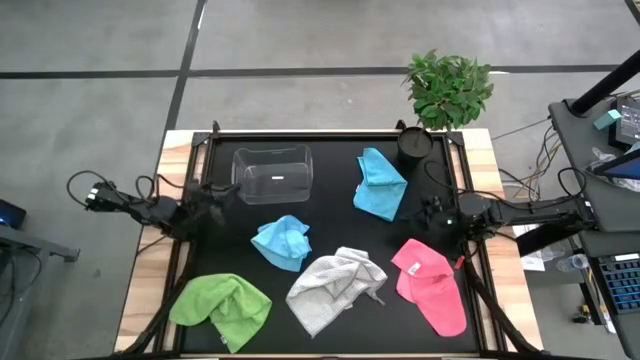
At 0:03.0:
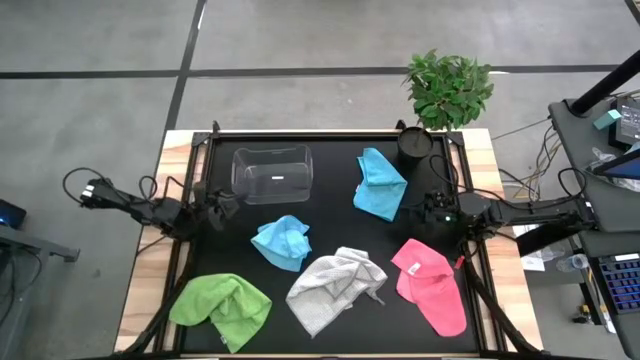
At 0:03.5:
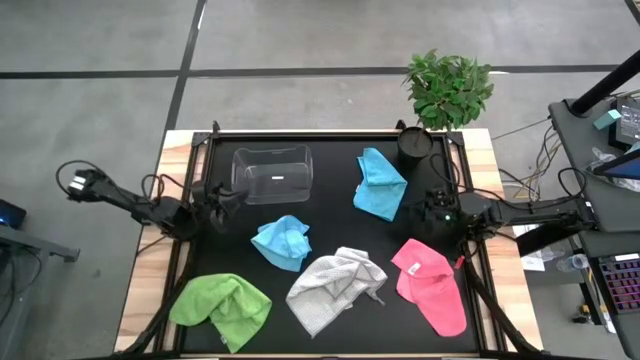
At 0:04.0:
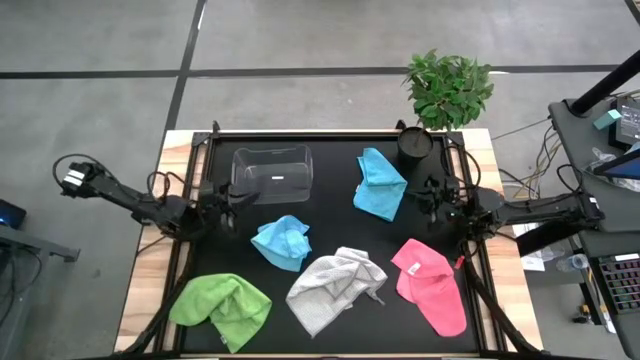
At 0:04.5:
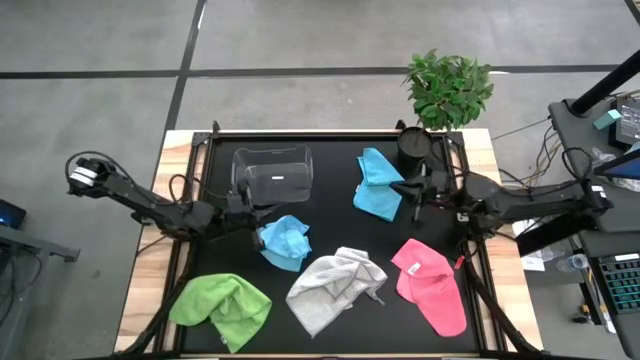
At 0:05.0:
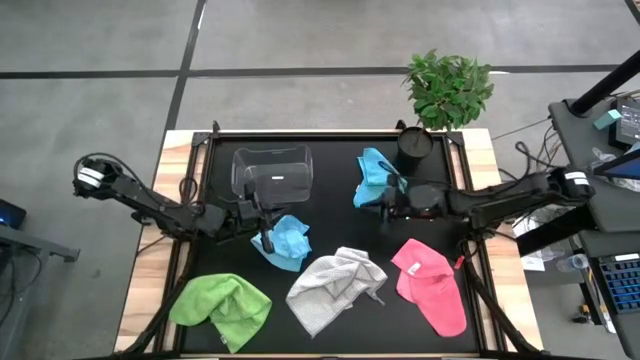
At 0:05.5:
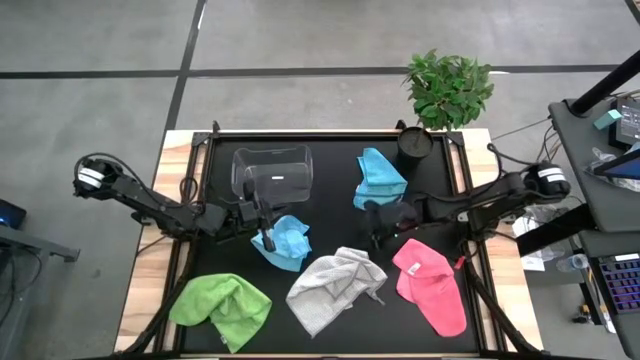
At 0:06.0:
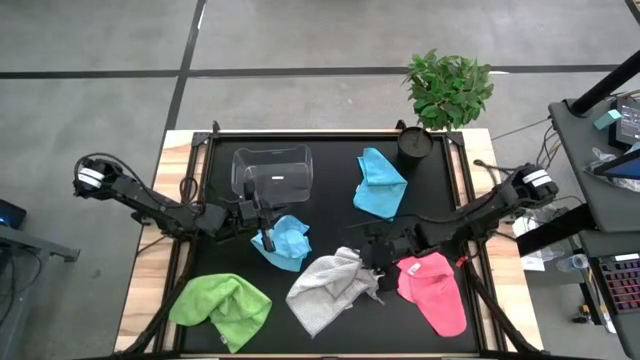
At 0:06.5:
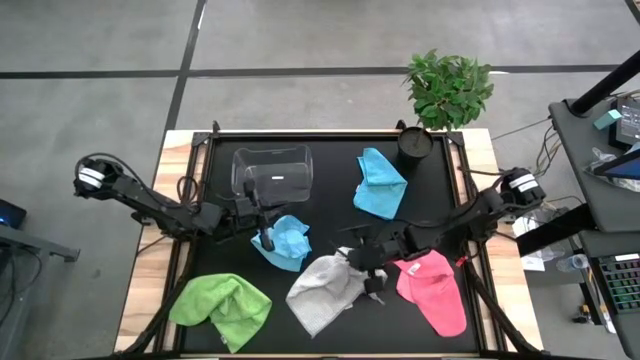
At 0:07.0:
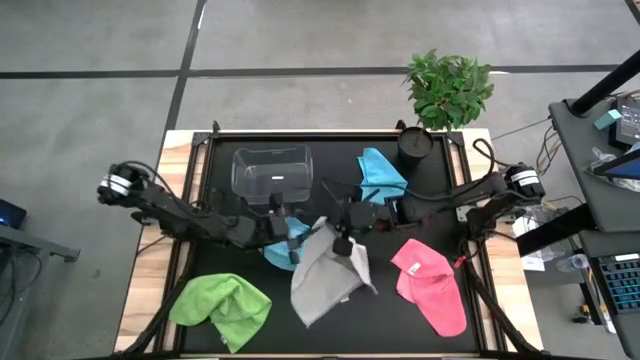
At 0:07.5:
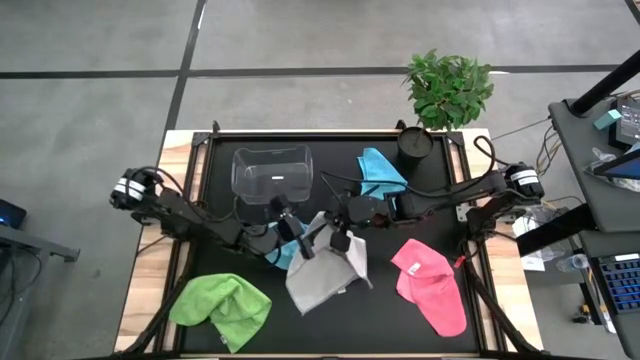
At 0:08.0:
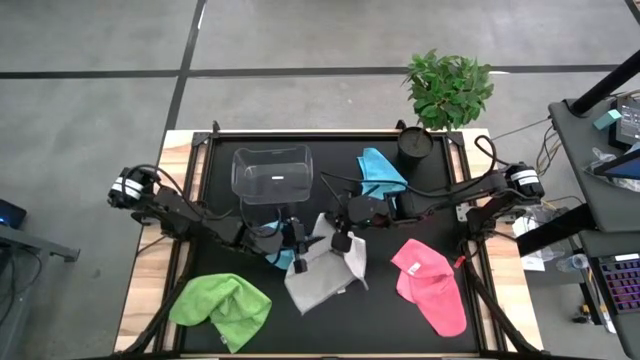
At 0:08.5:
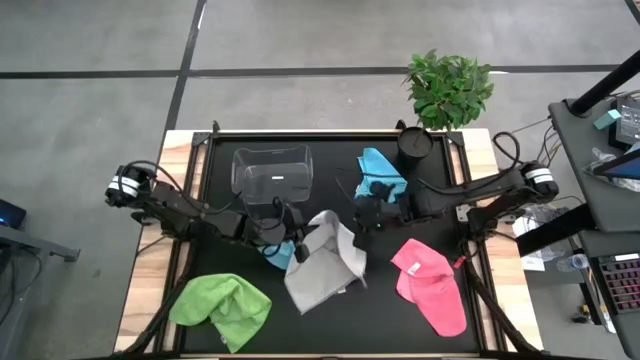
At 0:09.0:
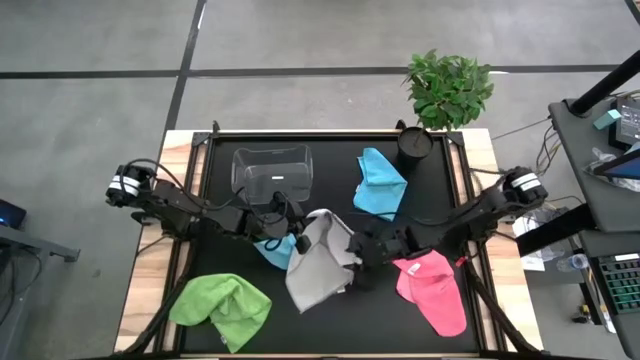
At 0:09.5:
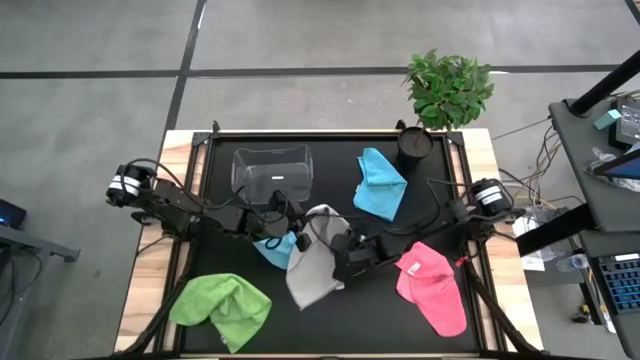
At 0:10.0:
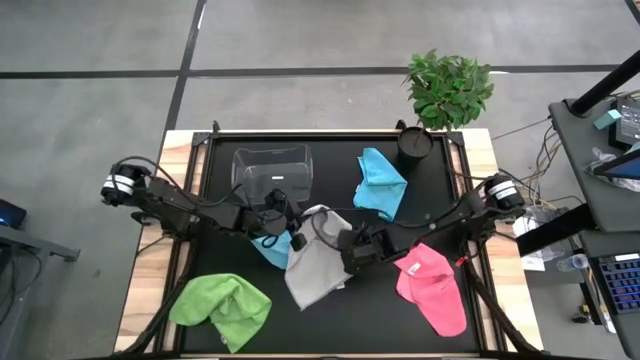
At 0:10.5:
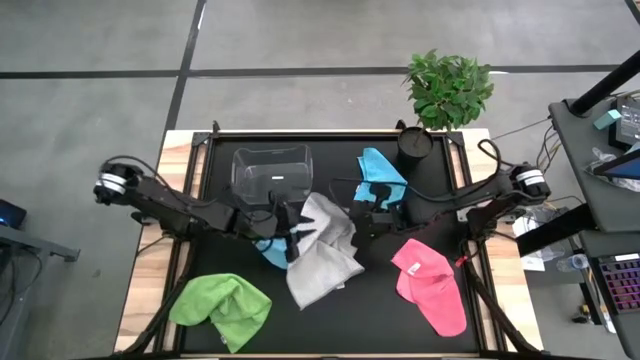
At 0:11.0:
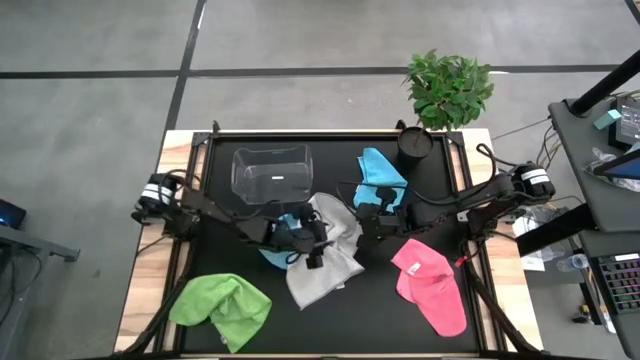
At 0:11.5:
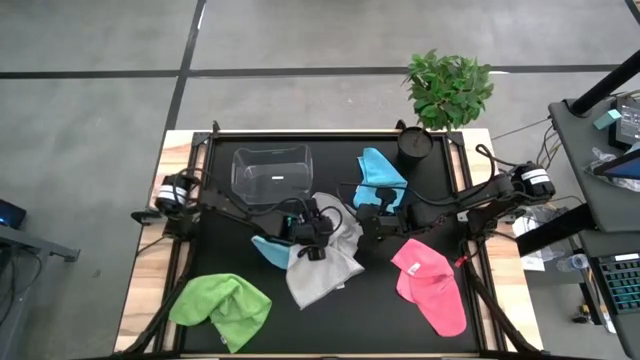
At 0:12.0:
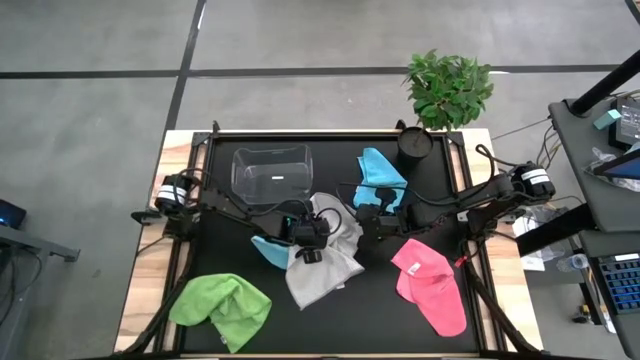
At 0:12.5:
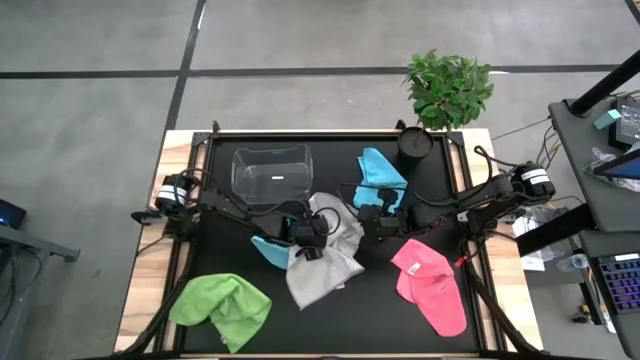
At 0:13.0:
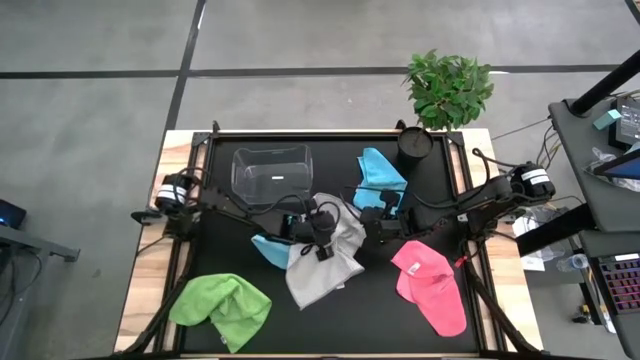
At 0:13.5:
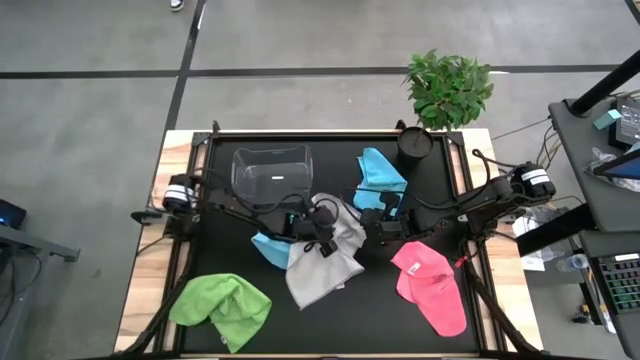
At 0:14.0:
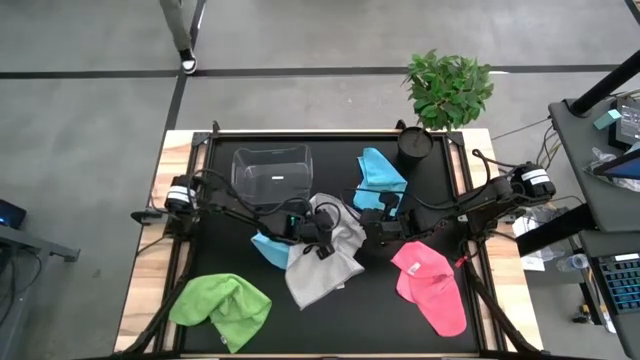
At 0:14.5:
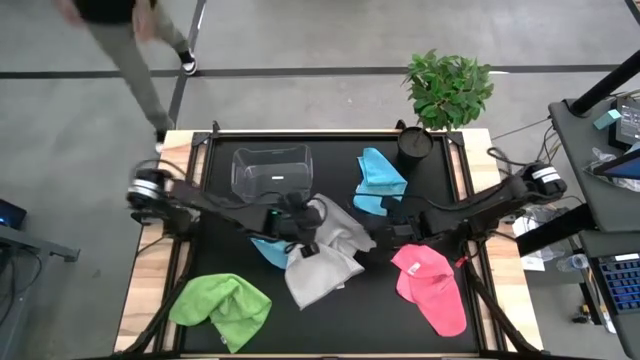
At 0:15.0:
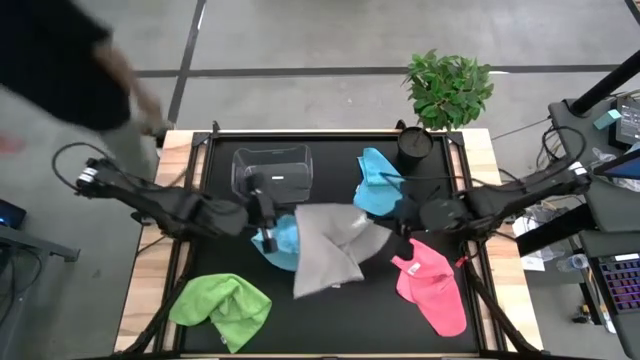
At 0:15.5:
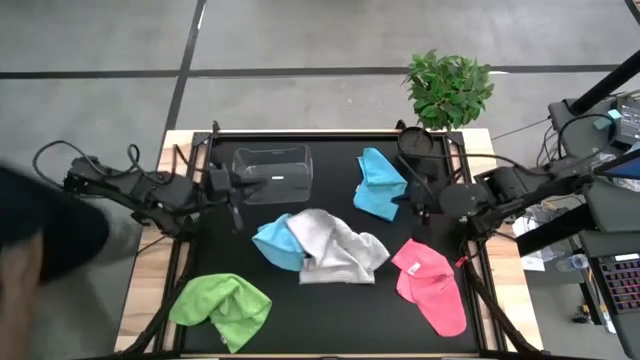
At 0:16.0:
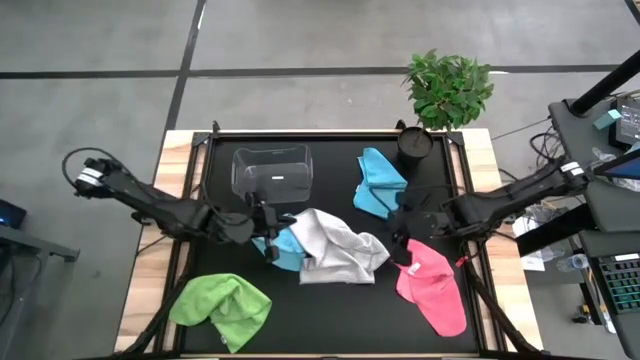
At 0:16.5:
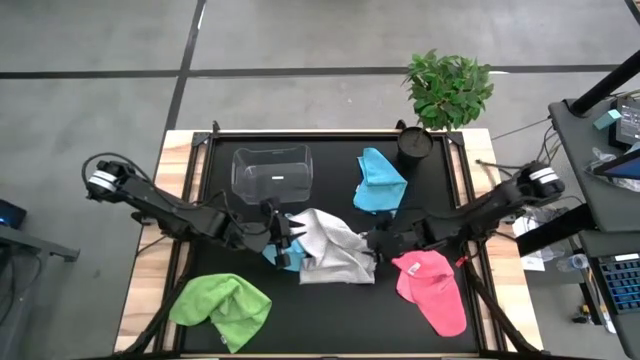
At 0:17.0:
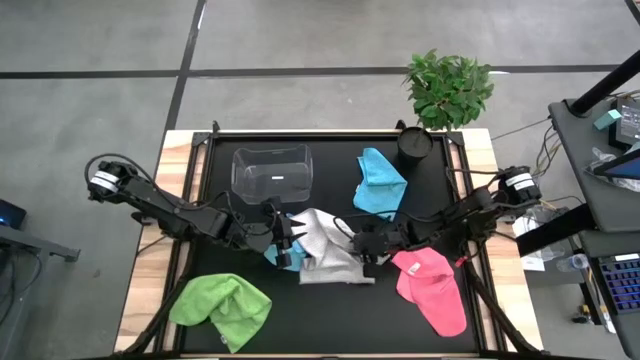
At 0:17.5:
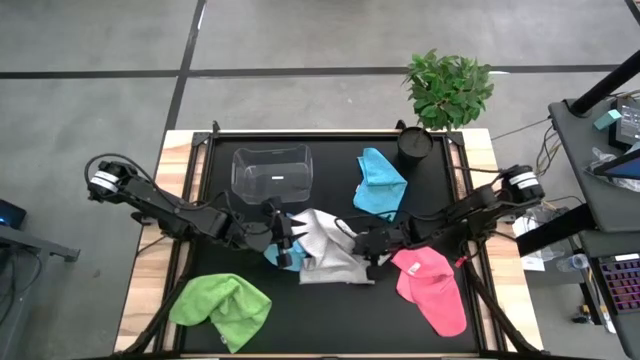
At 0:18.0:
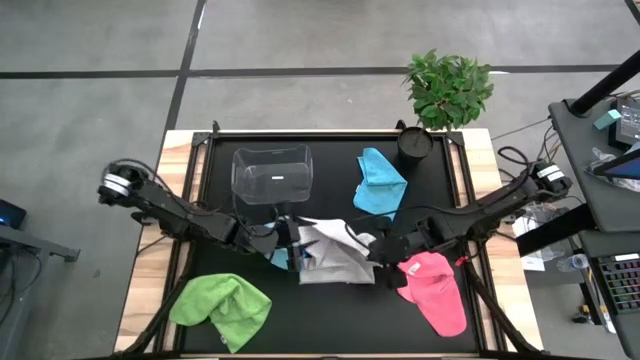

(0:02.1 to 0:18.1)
Task: Fold microfiber towels
Fold the gray microfiber cloth
